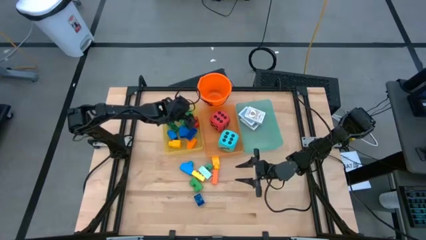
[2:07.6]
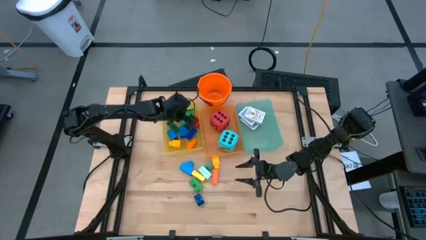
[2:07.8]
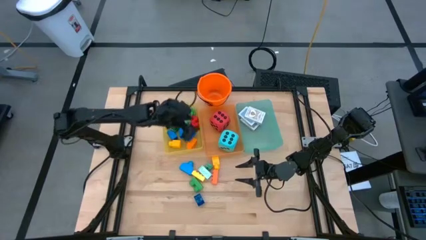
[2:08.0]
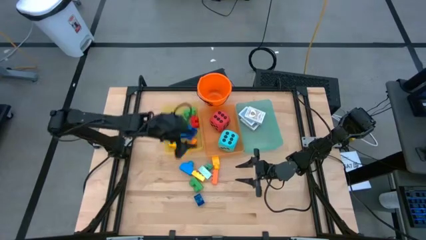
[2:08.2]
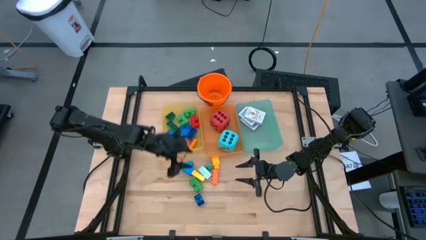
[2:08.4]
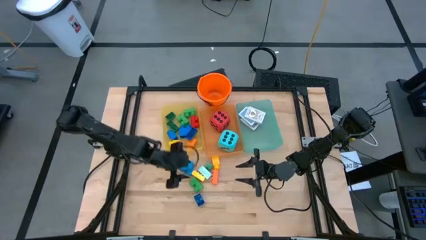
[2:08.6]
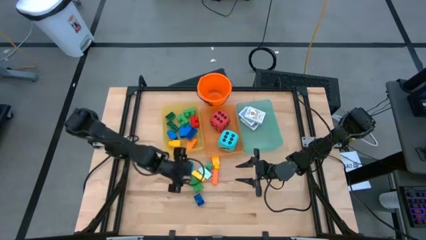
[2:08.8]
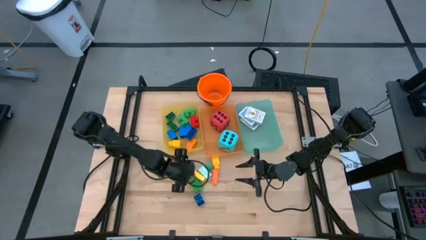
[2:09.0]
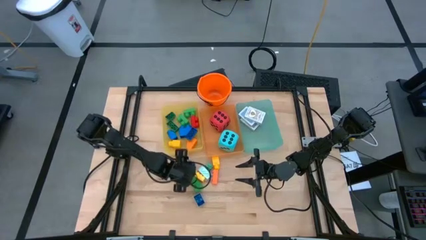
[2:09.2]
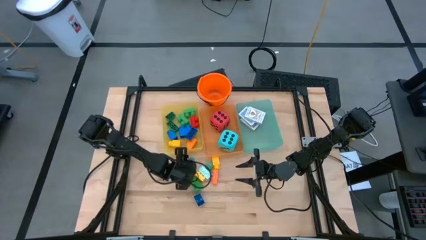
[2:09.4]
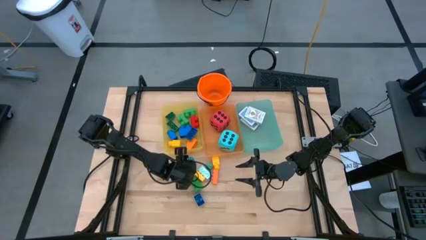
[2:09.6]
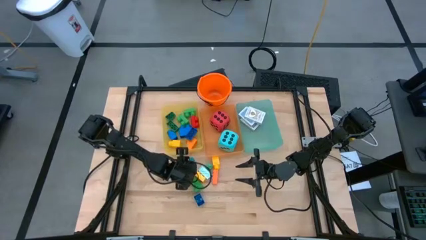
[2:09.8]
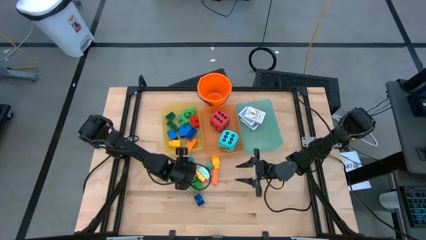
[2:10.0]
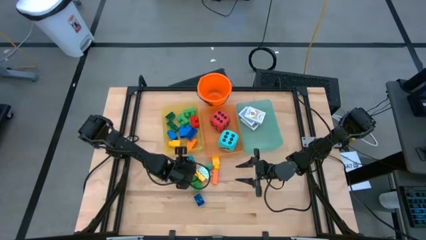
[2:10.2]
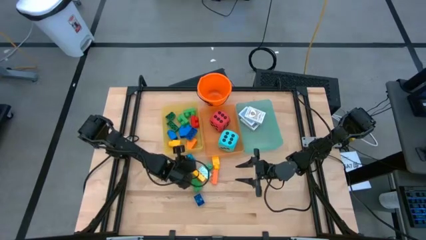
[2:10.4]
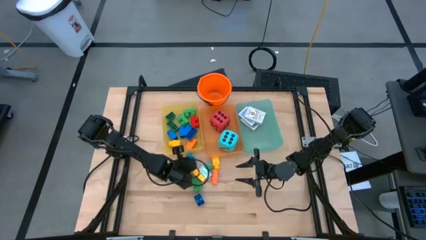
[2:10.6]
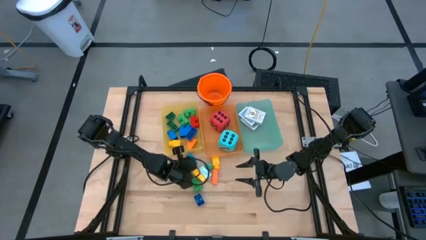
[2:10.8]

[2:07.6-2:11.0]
Task: Pick & Place Toys
Put the blue game piece into the yellow bin

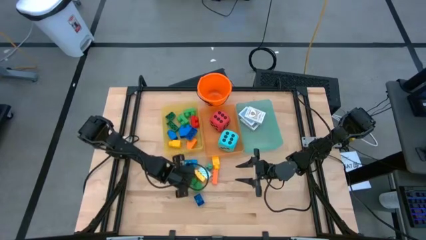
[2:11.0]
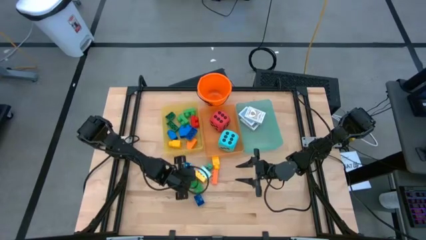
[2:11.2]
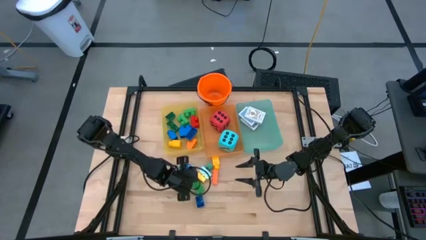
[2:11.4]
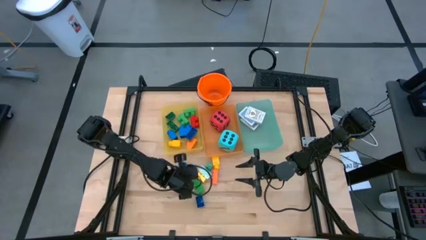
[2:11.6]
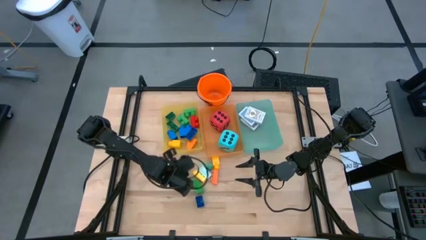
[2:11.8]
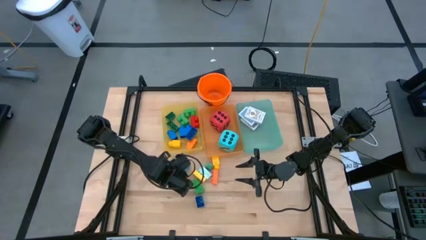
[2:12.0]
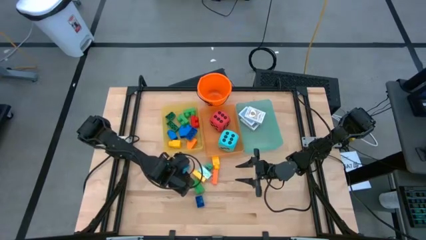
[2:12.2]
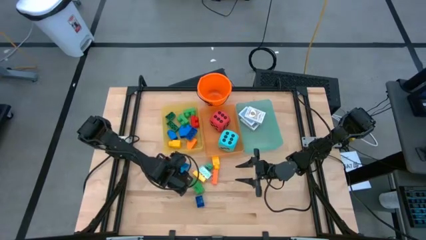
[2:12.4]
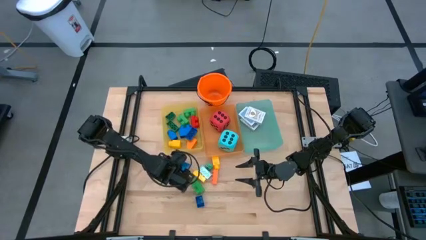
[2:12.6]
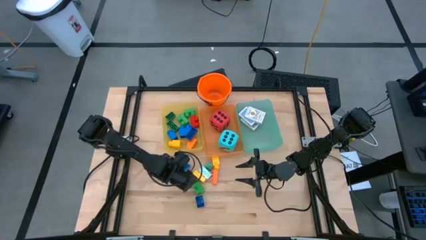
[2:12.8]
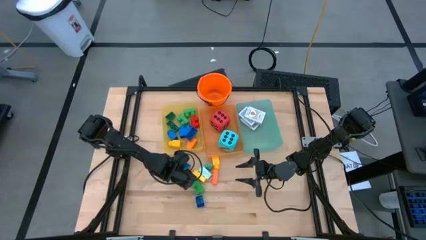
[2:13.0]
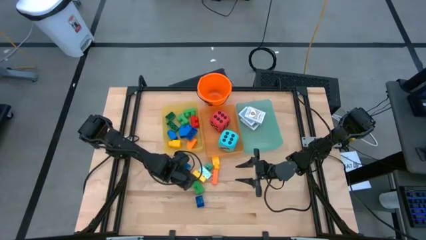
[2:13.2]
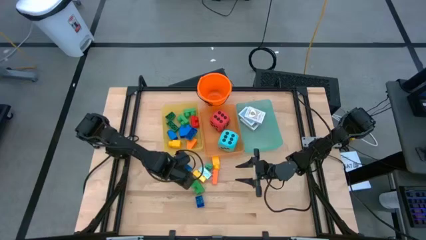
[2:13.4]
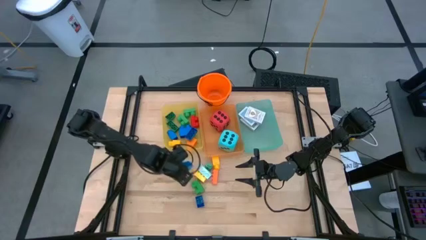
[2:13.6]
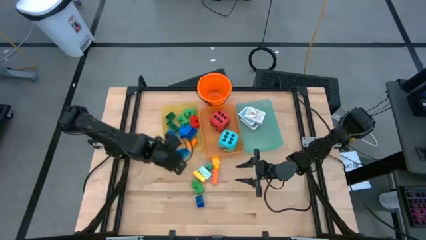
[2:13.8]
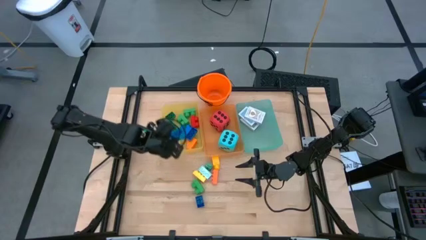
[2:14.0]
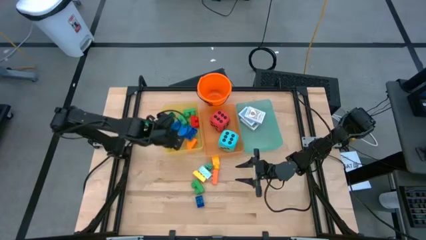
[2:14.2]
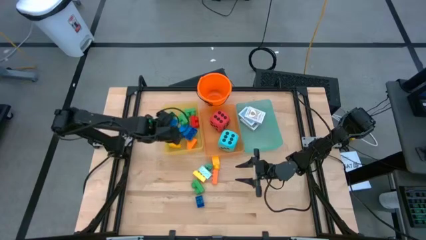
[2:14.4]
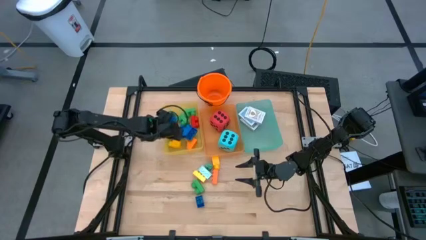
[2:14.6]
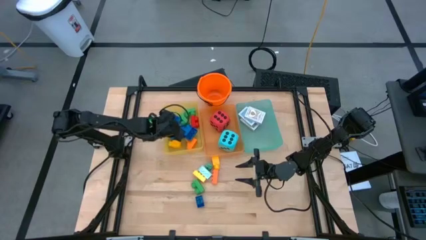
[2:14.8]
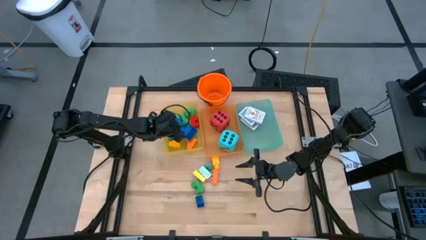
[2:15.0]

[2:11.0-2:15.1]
Put the blue game piece into the yellow bin

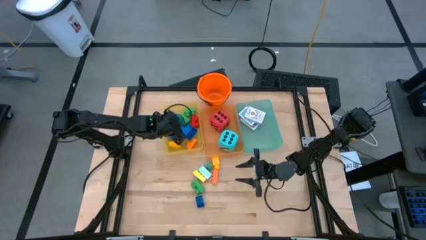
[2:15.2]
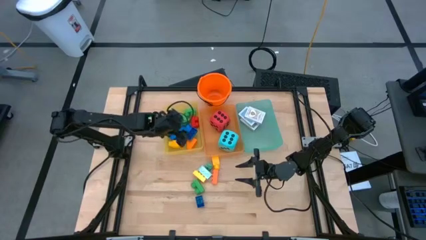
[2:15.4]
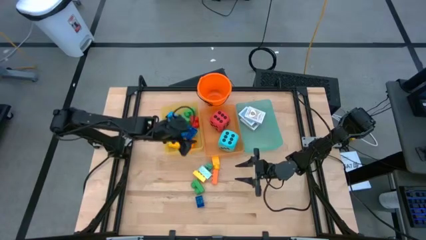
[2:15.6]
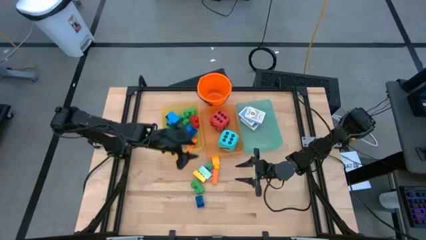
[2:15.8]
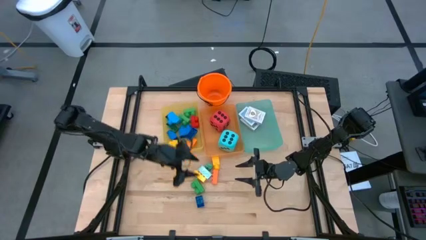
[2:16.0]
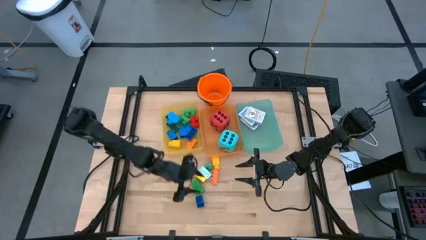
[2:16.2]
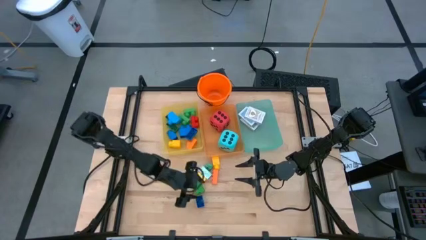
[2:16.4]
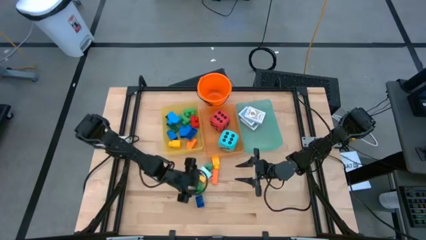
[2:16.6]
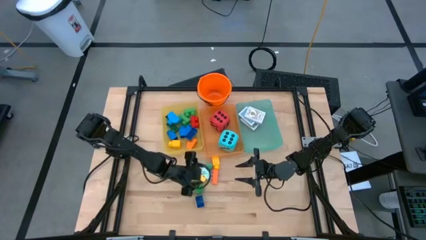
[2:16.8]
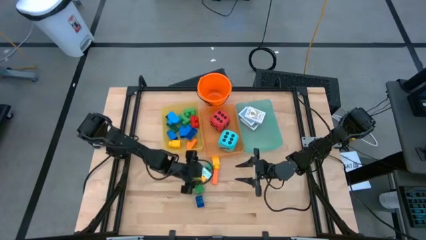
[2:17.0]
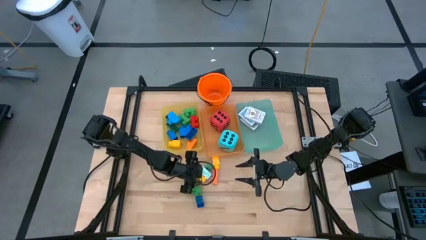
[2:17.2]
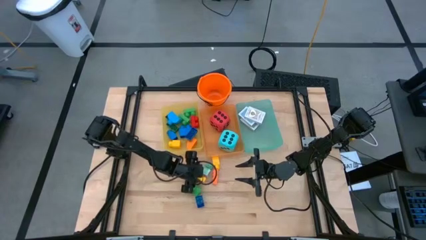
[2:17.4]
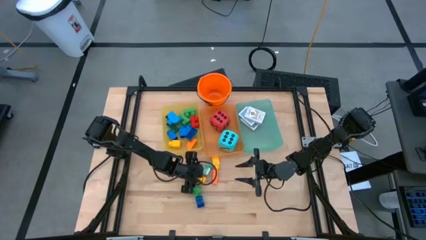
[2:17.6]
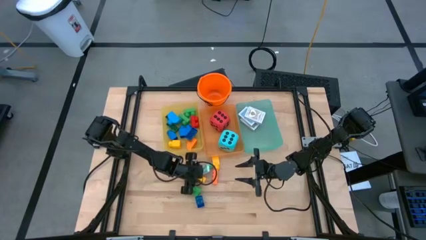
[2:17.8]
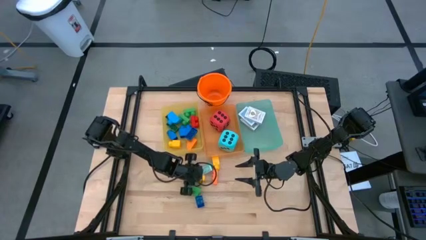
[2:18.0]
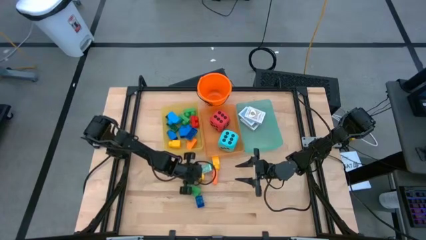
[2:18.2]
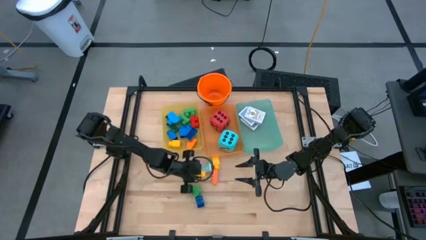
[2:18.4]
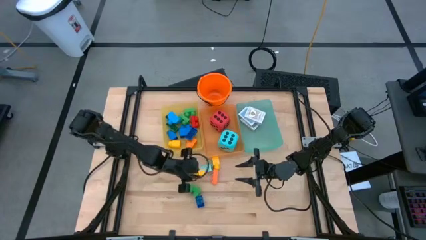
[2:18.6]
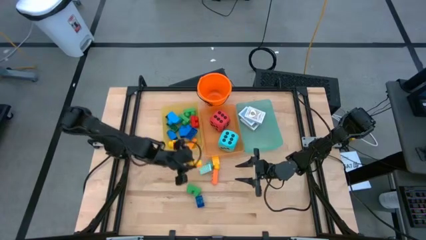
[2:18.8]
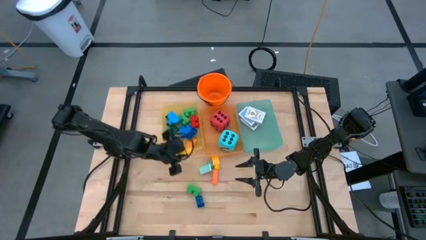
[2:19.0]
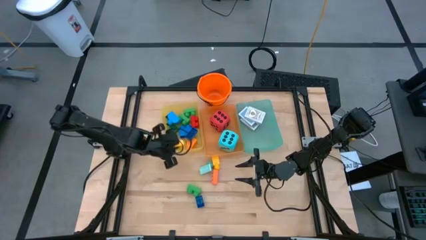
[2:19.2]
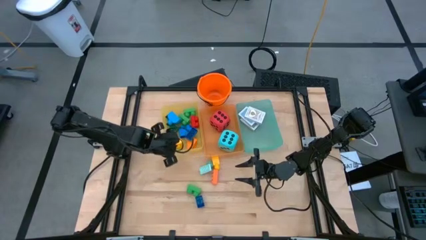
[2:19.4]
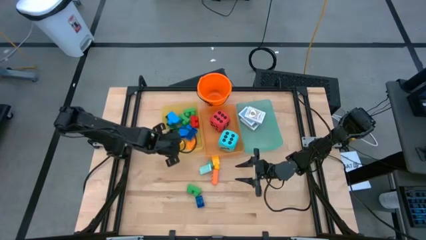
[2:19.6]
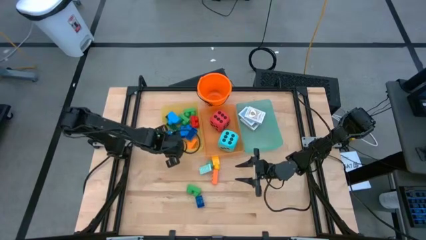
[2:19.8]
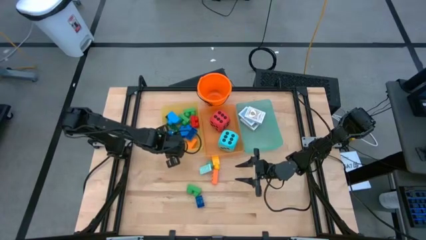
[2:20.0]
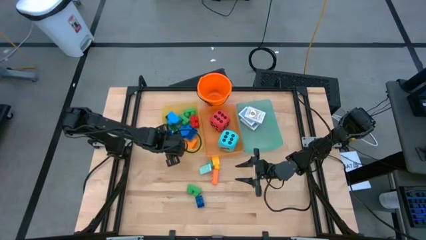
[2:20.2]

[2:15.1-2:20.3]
Put the yellow game piece into the yellow bin

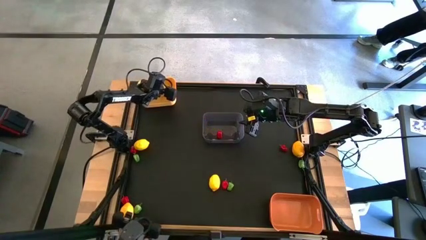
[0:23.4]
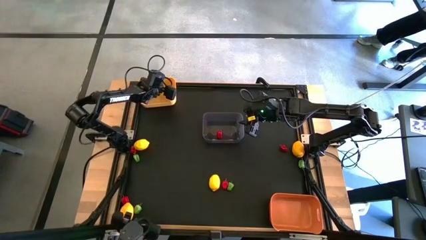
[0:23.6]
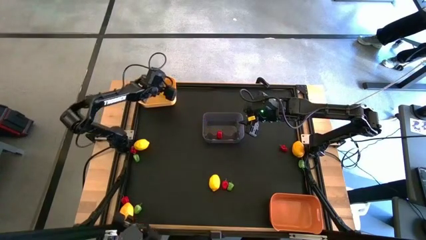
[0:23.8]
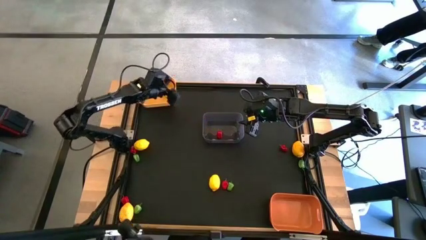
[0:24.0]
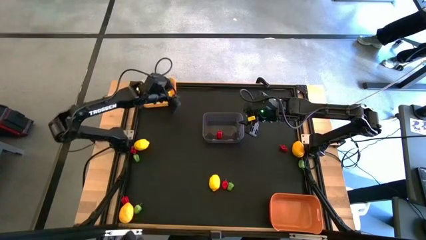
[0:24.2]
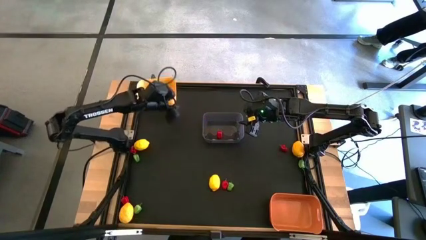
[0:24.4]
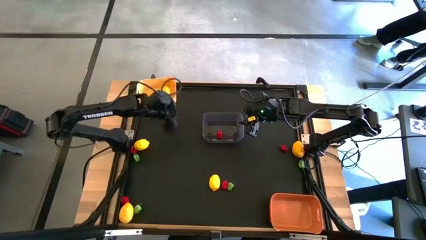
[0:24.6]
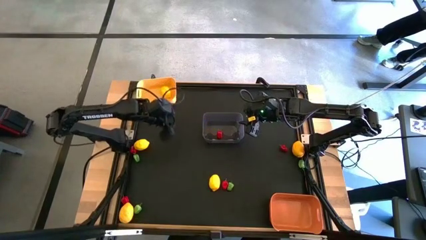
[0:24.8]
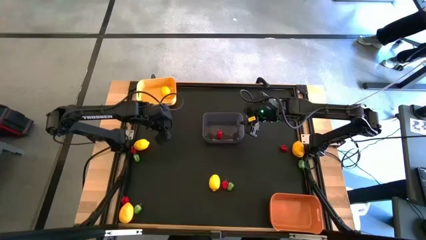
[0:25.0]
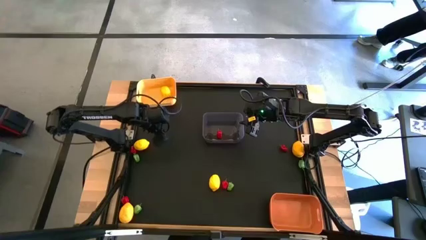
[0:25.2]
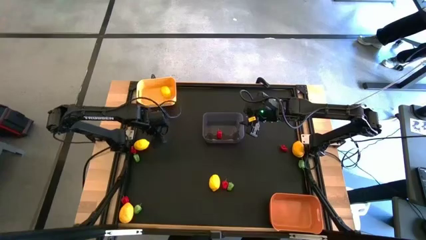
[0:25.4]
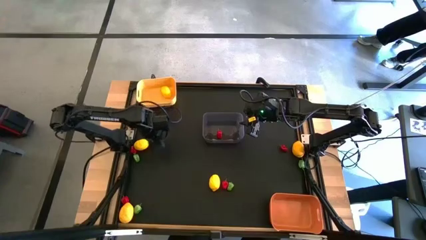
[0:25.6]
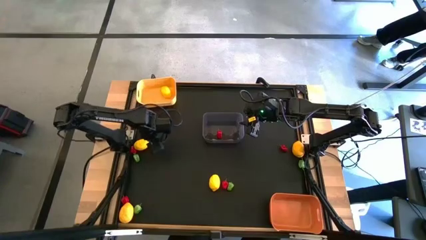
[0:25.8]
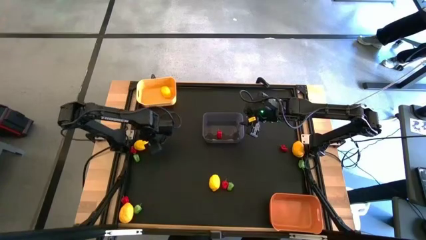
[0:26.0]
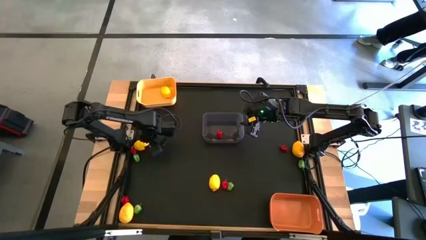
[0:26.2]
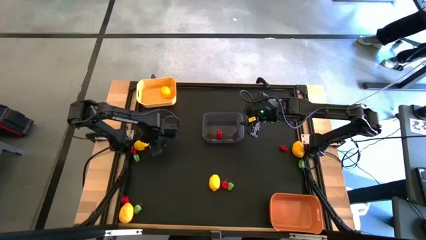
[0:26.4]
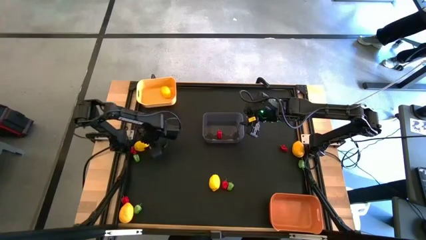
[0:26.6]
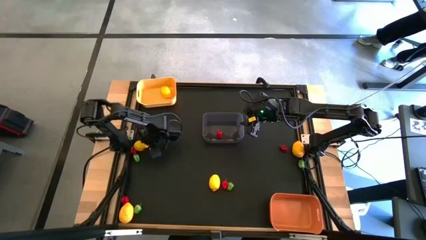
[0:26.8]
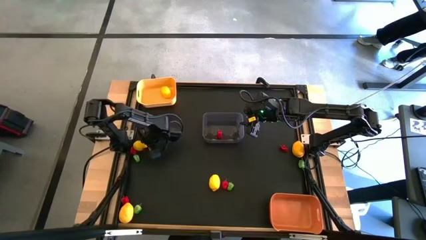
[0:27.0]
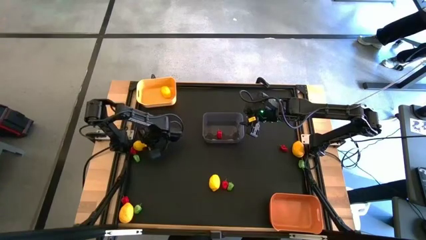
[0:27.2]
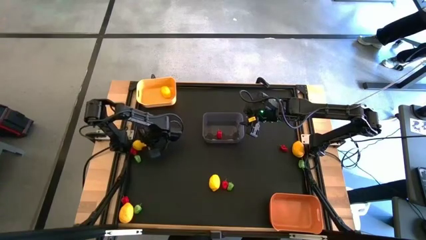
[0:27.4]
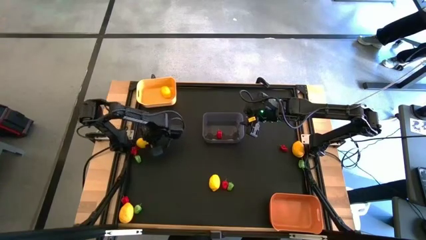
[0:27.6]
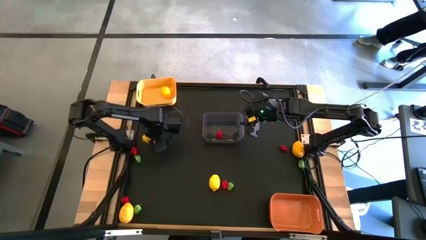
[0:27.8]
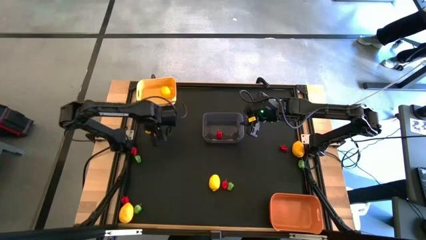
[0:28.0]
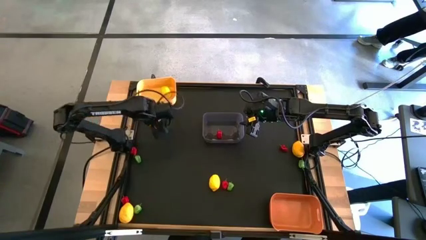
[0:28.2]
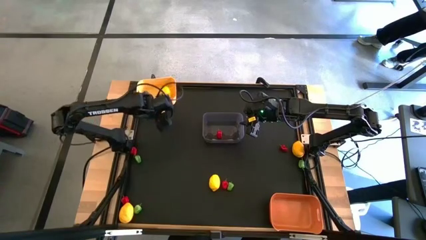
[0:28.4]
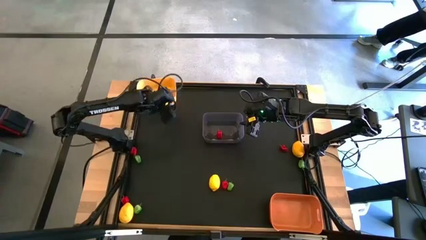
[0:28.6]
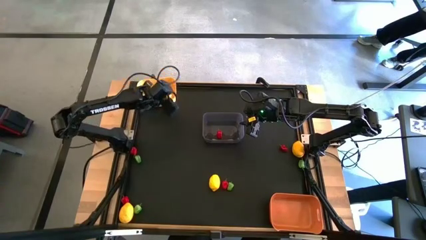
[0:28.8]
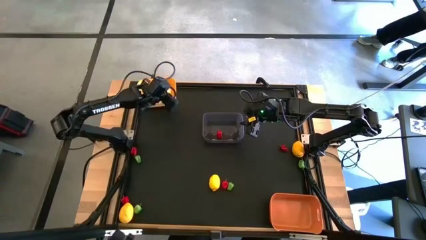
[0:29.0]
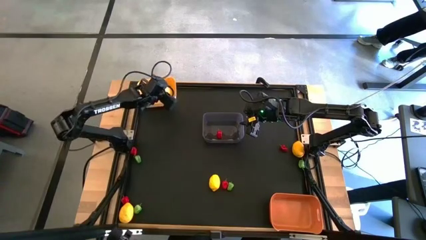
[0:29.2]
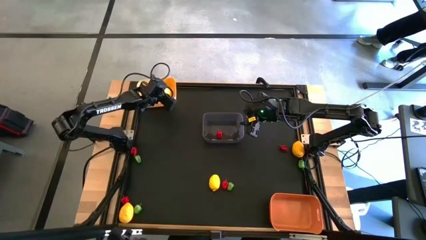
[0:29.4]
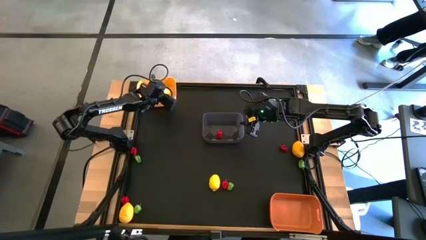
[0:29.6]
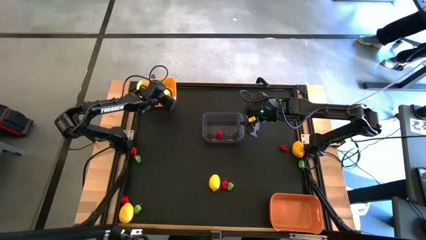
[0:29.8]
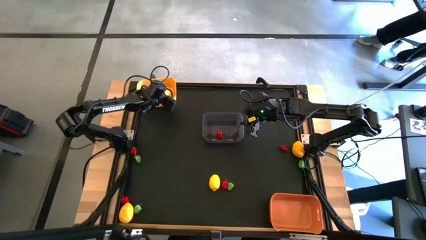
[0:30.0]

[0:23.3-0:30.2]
Task: Sort produce into baskets
Put the yellow lemon into the yellow bin
